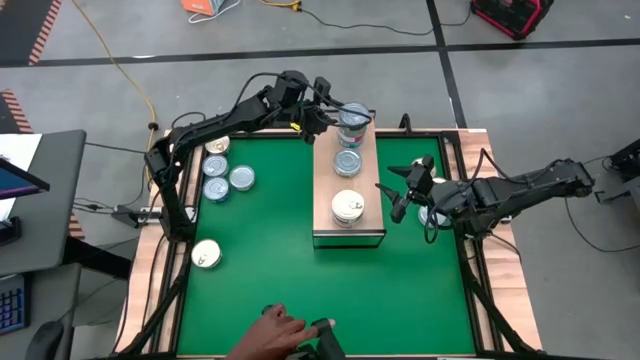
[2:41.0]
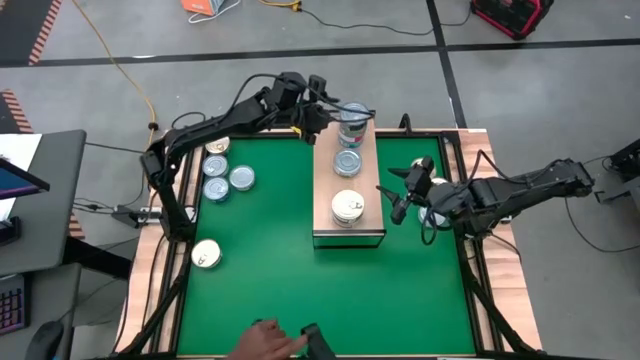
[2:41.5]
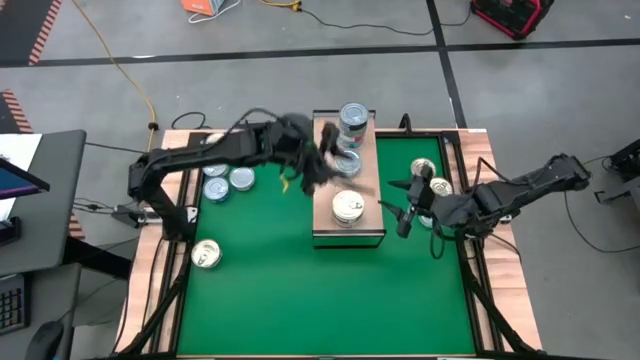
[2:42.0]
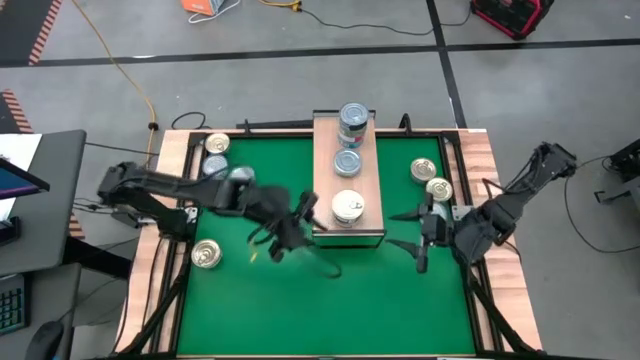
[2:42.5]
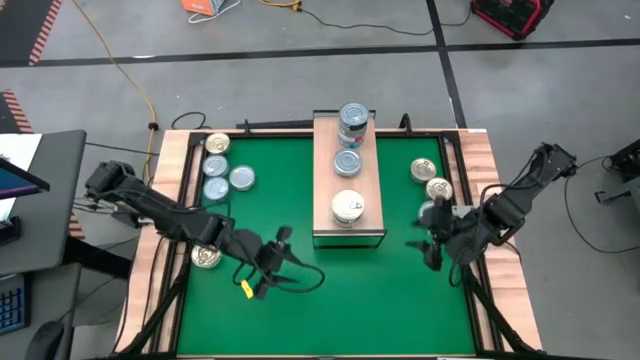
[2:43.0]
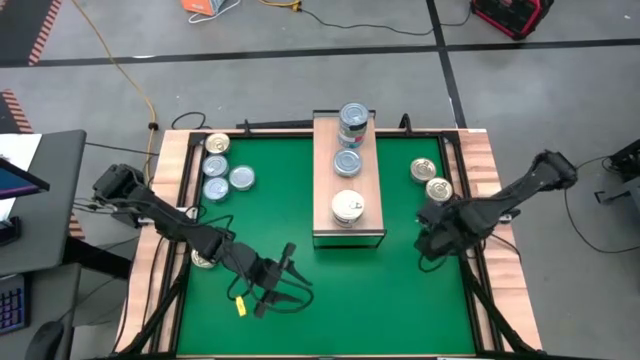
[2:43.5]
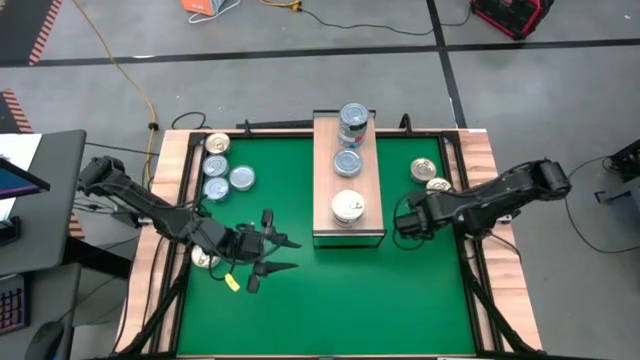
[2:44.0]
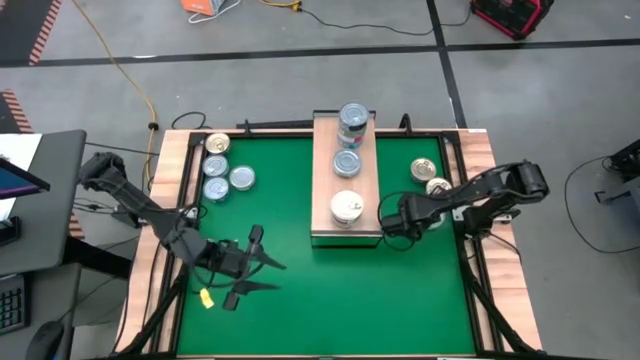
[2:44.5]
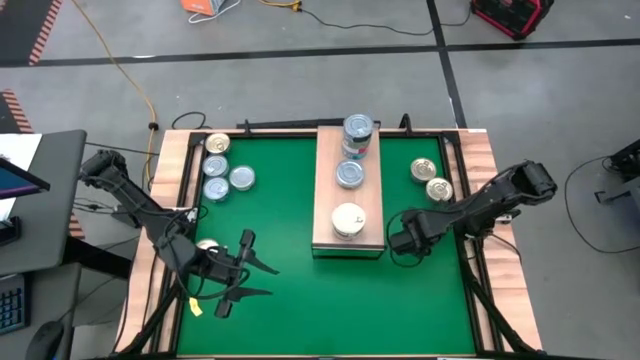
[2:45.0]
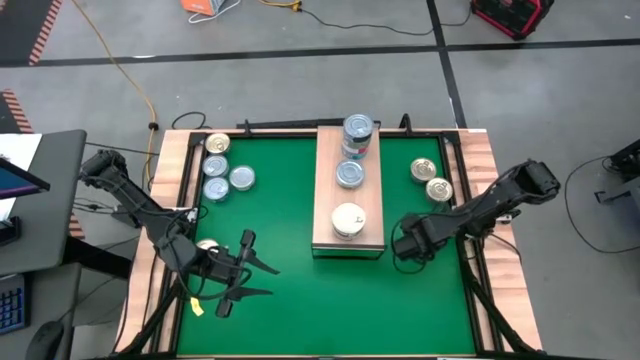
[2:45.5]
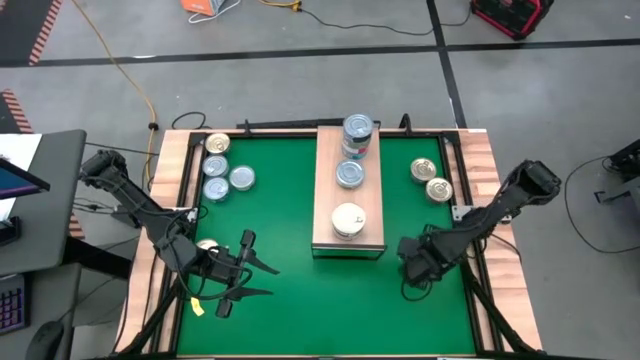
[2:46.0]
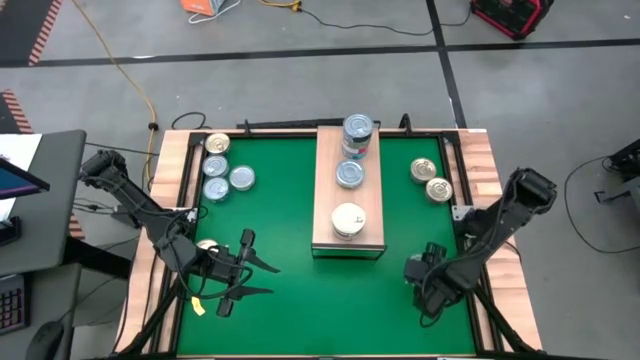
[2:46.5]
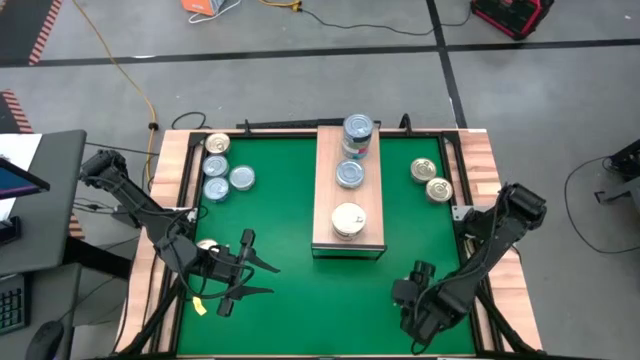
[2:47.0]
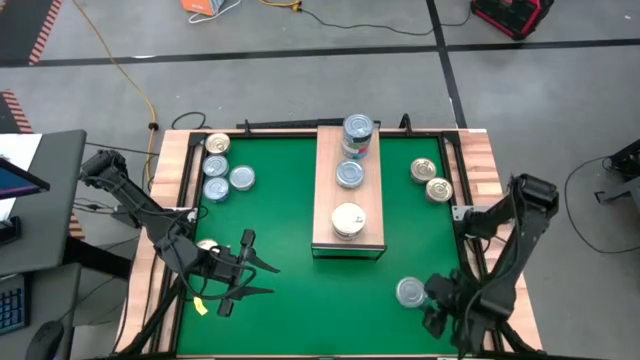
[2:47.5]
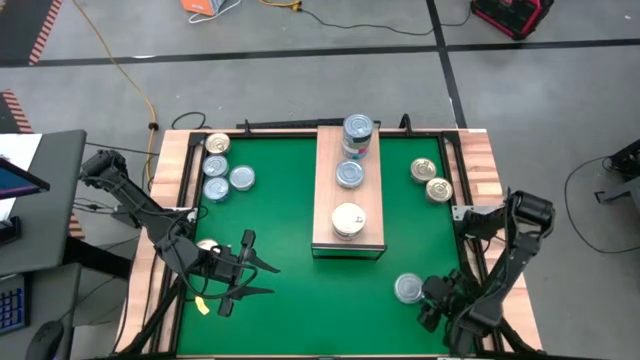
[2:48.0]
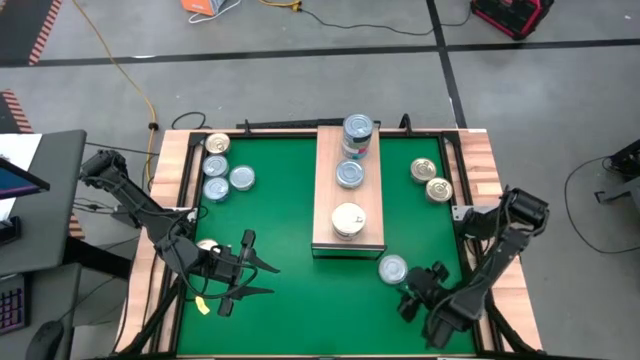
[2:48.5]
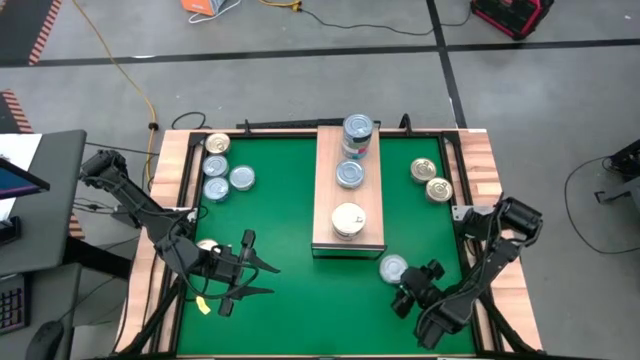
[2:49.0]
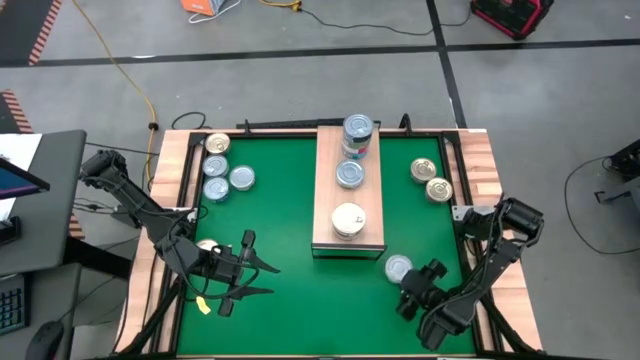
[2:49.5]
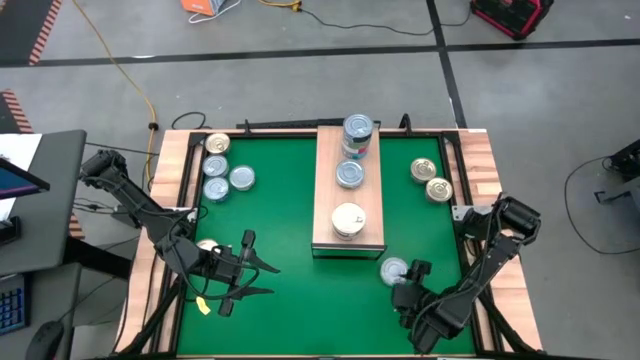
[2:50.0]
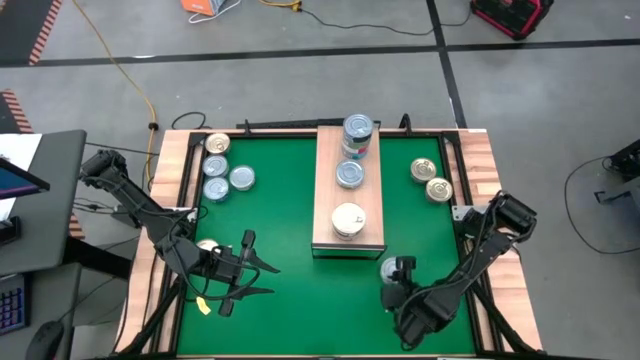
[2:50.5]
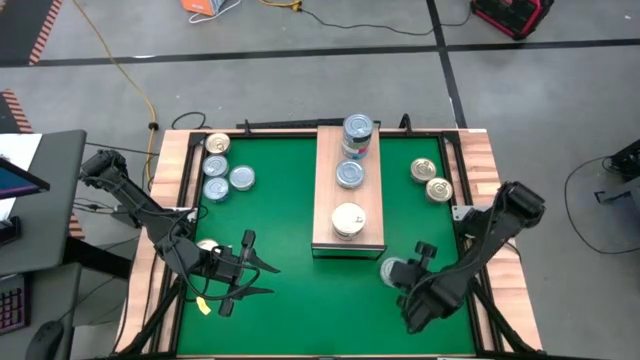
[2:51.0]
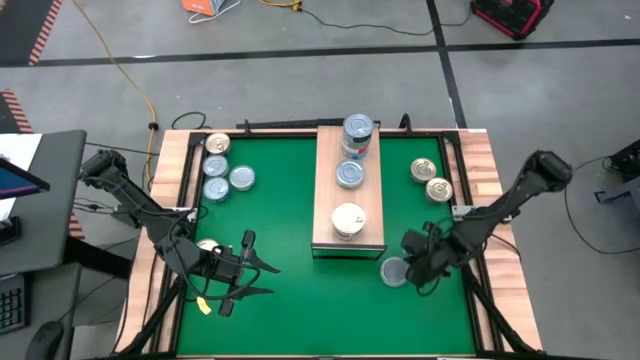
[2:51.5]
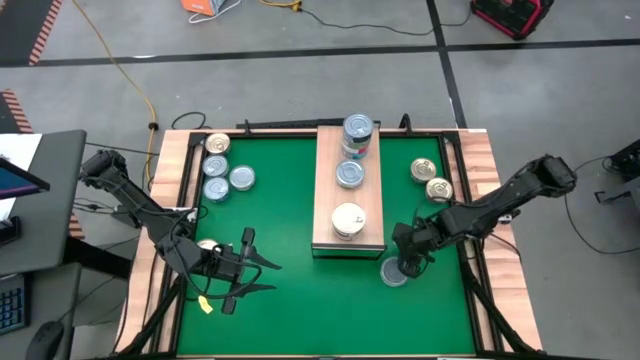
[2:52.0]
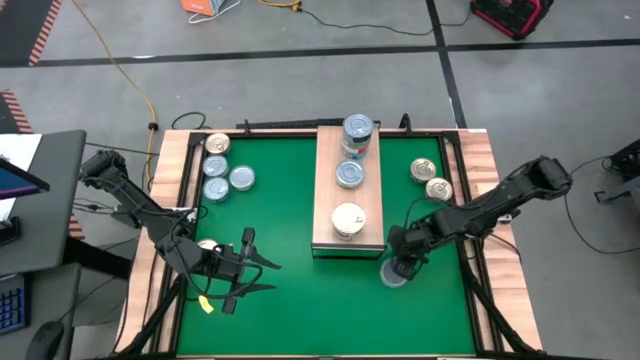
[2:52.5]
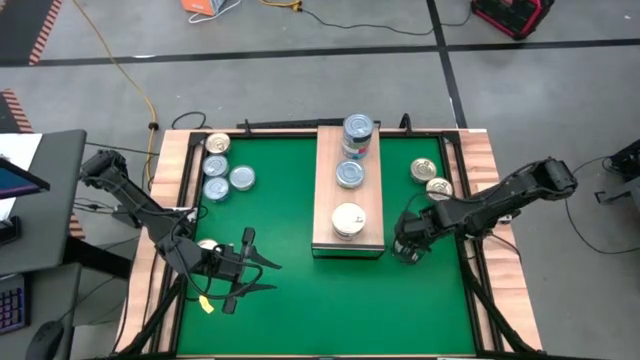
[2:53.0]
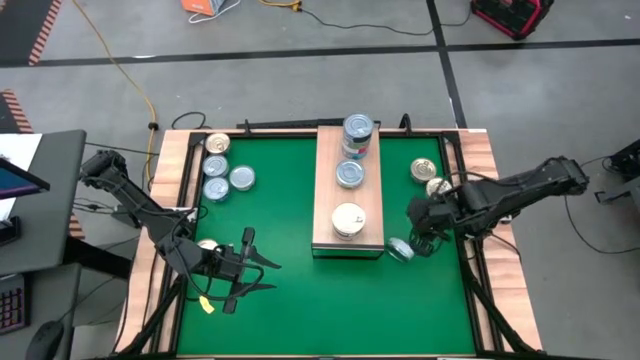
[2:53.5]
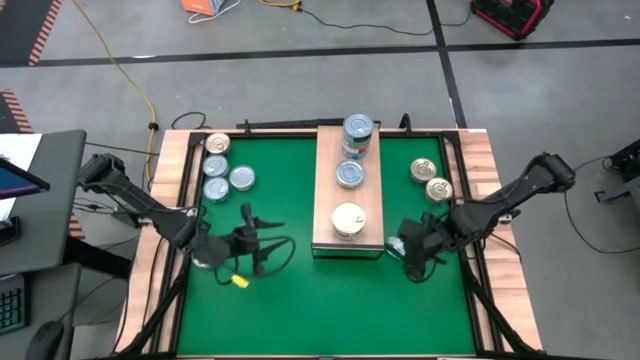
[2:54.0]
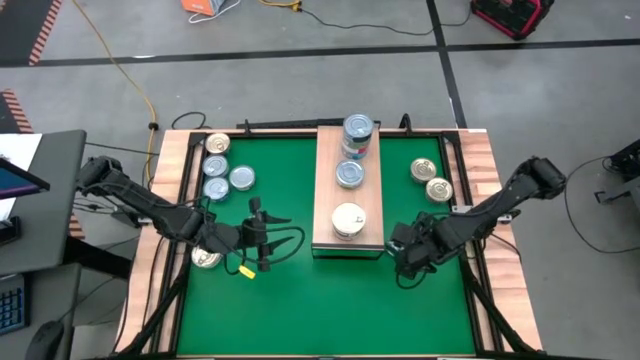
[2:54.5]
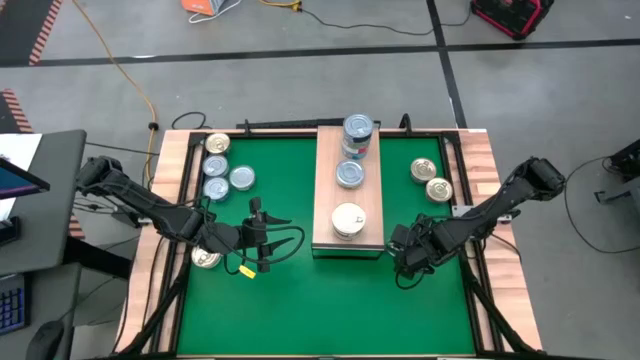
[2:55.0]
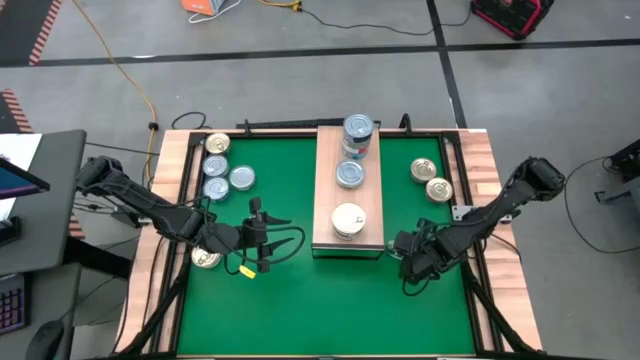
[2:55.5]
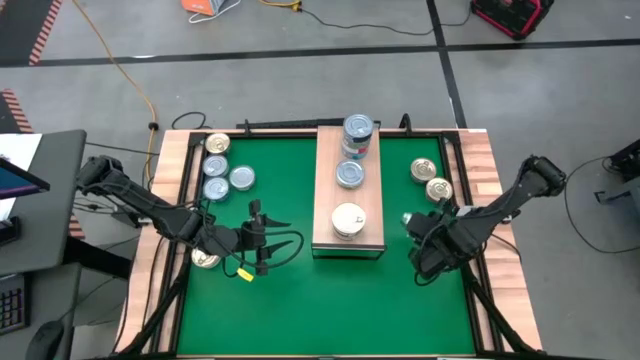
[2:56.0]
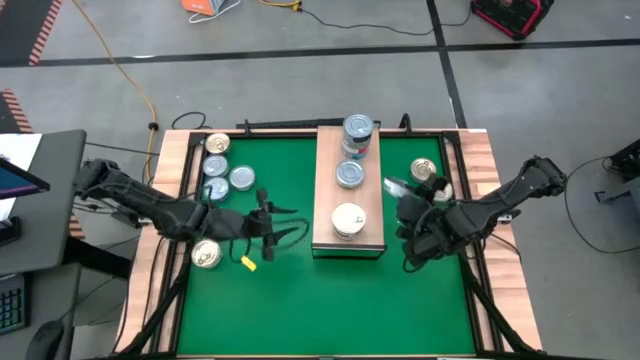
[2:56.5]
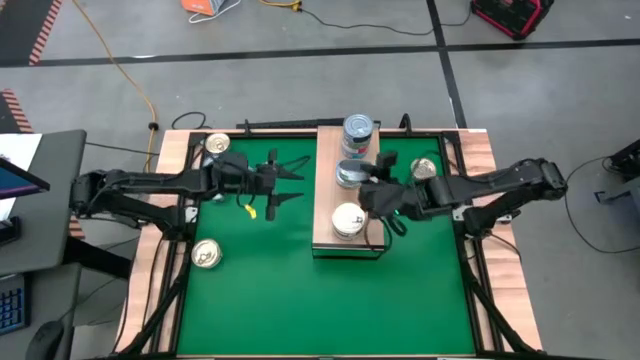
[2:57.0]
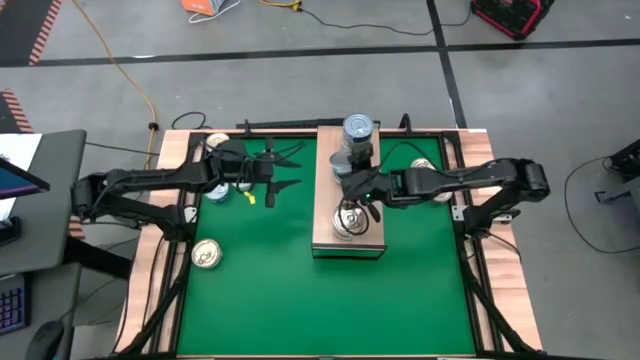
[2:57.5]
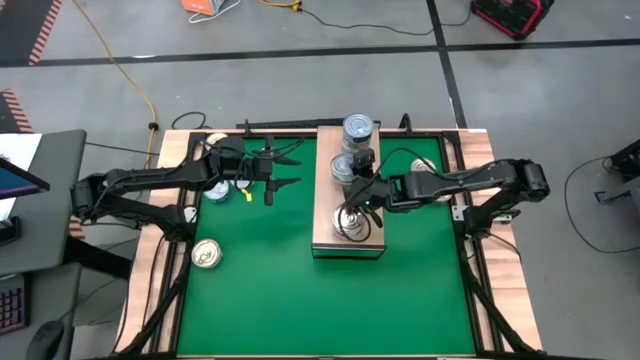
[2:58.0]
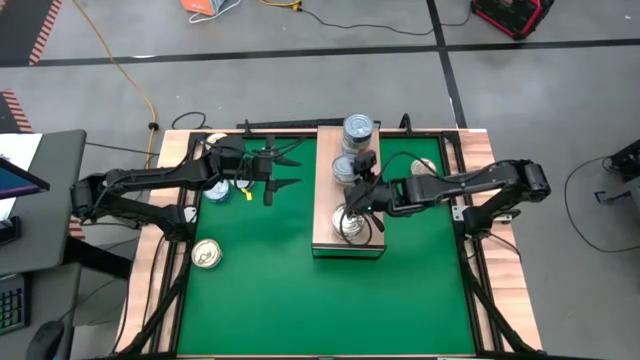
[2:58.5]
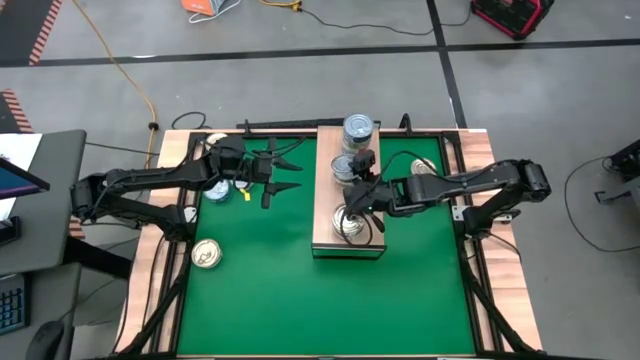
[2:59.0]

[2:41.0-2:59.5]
Task: Stack canned seafood by type on shelf
Stack the green tuna can on top of the green tuna can on the shelf

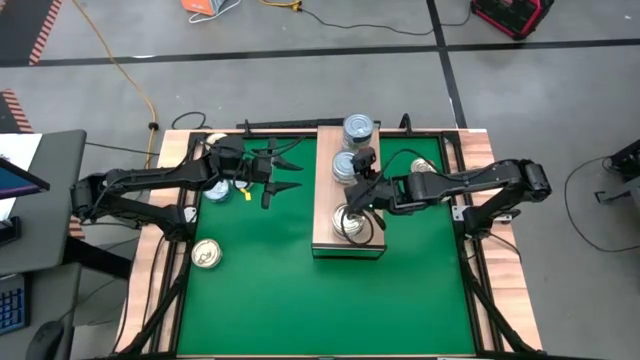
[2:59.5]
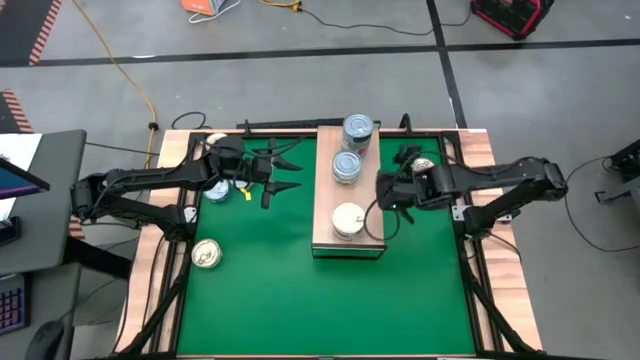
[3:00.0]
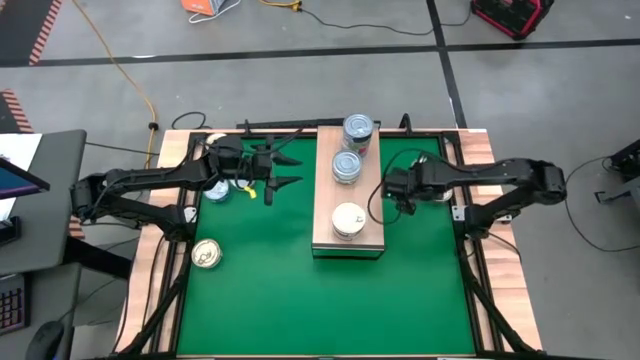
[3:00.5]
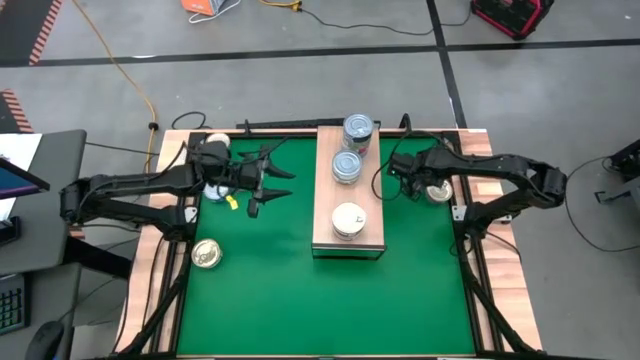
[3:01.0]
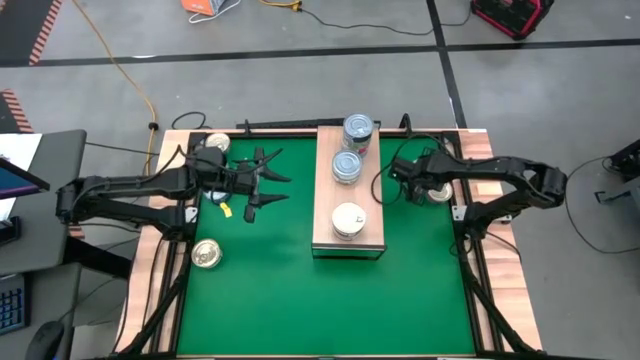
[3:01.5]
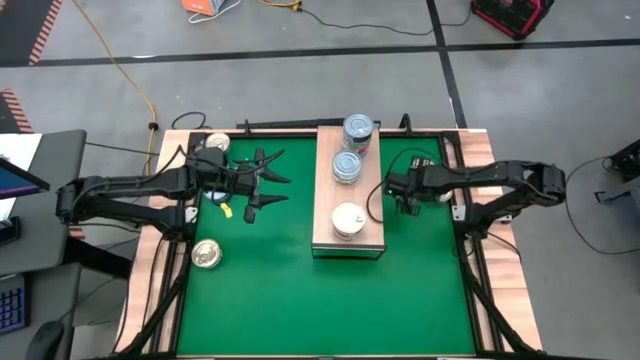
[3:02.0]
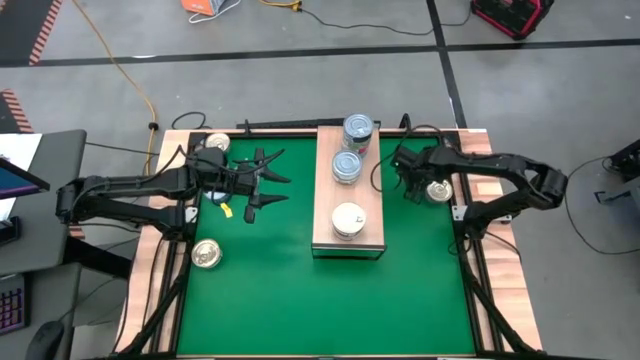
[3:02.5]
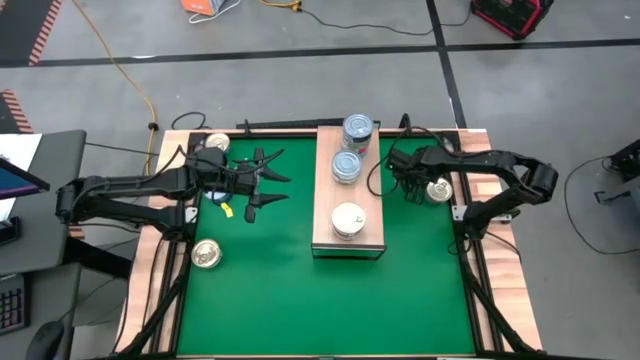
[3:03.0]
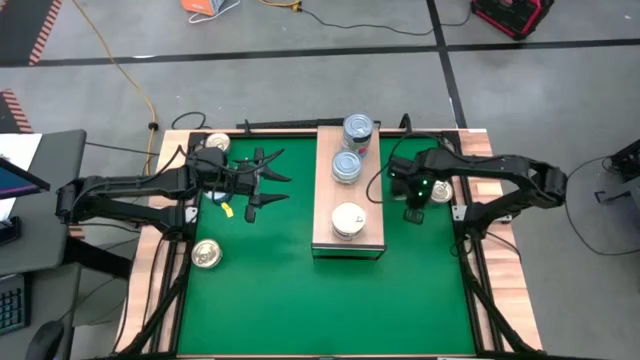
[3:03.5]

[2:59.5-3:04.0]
Stack the blue tuna can on top of the blue tuna can on the shelf
